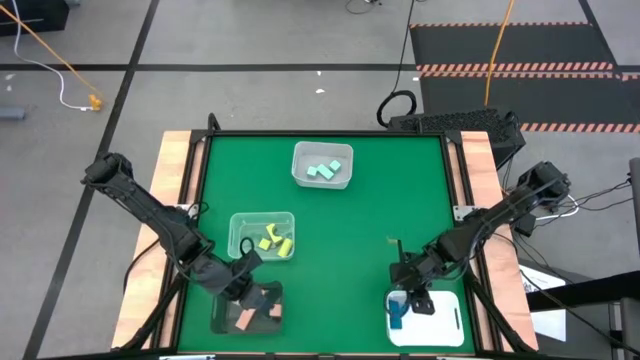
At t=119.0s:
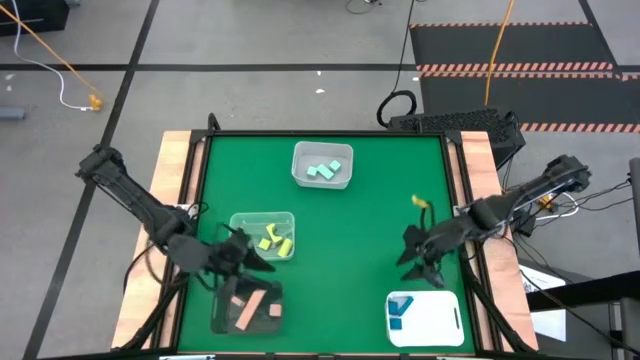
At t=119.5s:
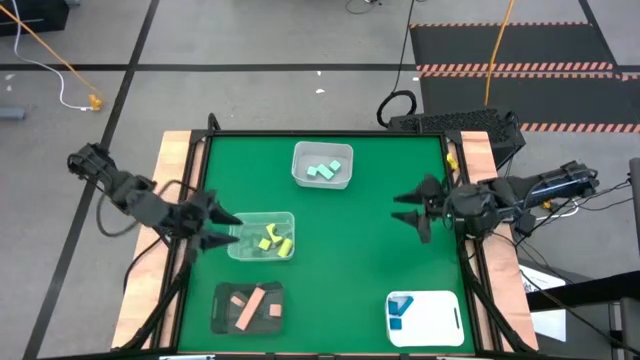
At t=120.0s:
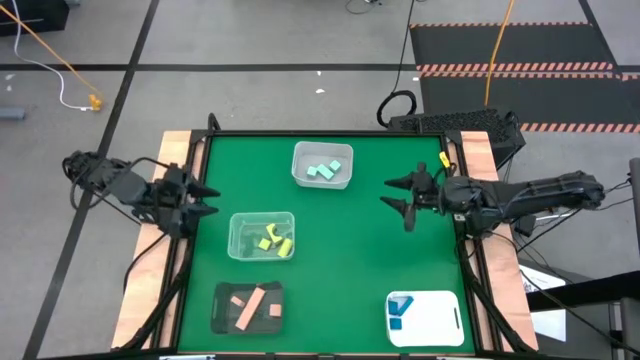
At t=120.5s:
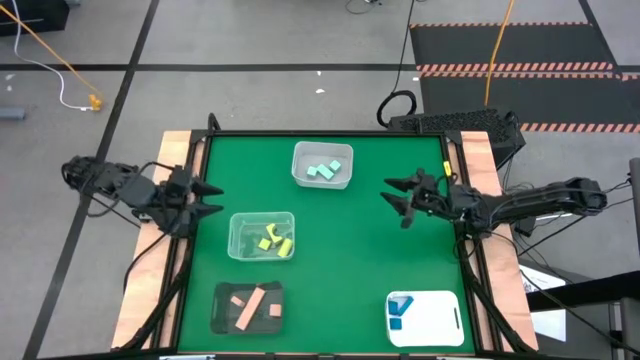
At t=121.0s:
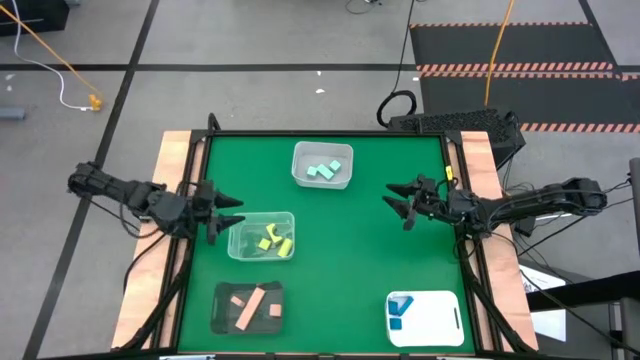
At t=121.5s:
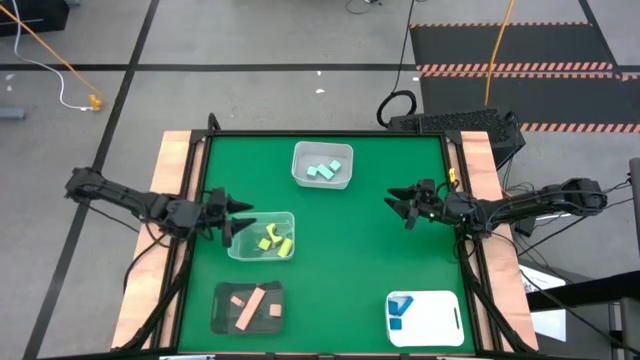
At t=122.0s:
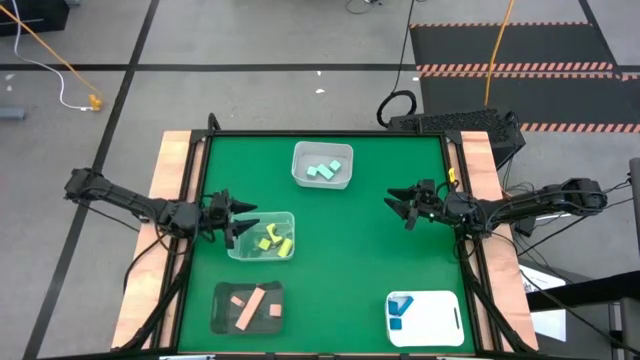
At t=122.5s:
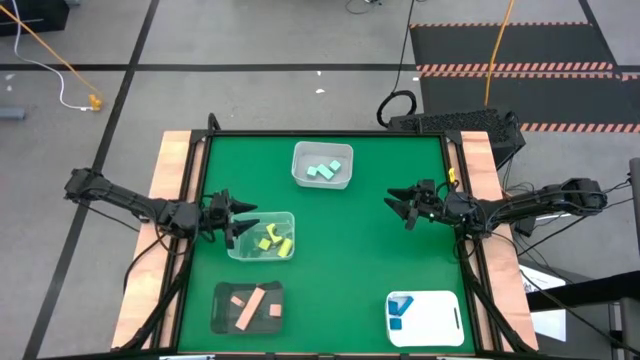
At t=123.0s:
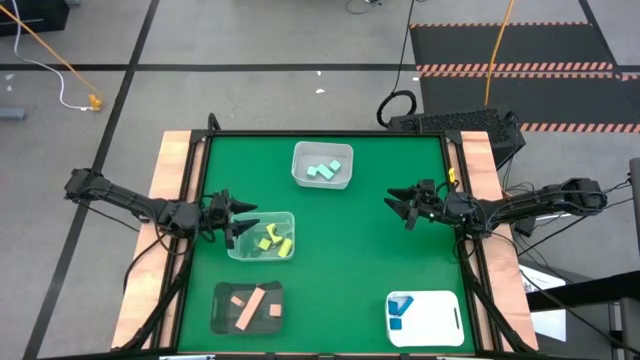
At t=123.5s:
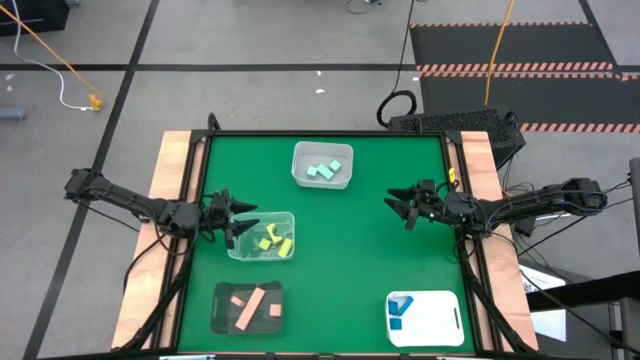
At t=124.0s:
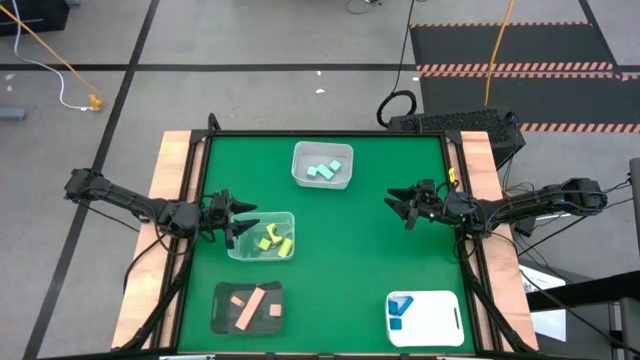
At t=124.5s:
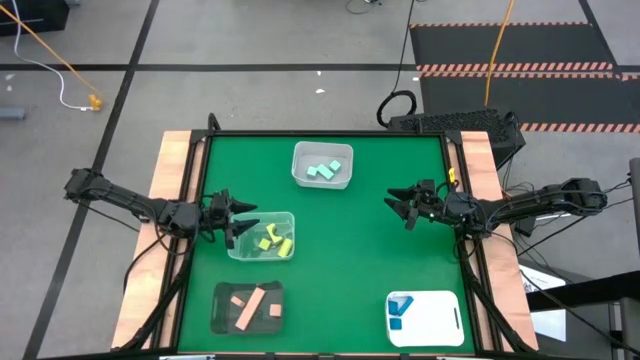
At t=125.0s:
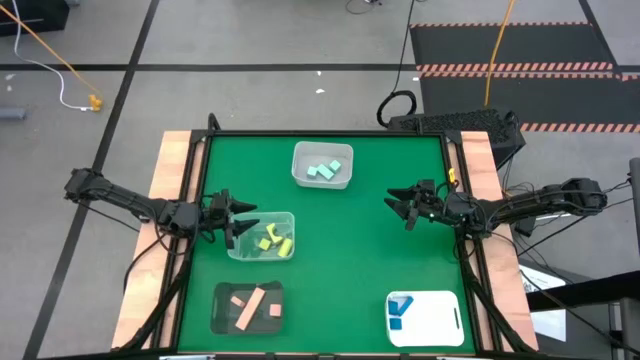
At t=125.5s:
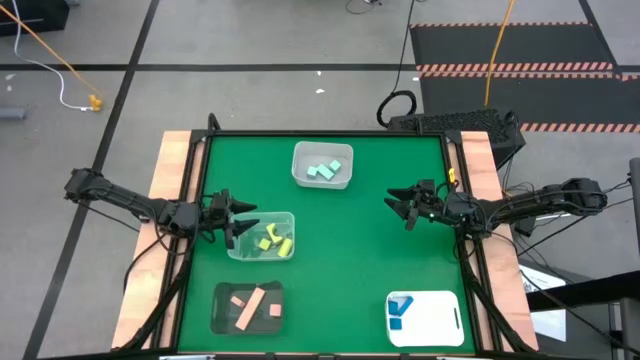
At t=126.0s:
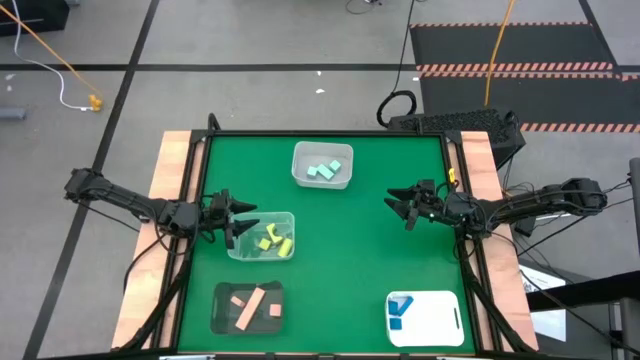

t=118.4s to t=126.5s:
Task: Sort & place blocks by color
Return to Home Position

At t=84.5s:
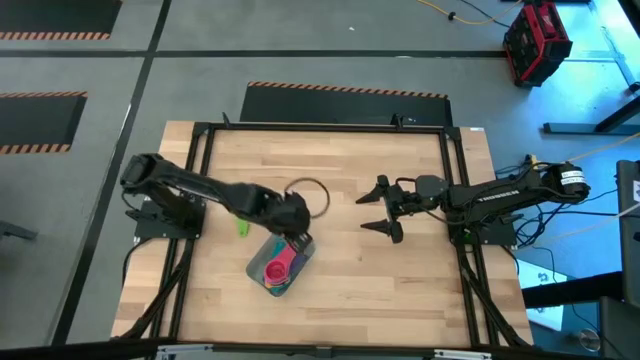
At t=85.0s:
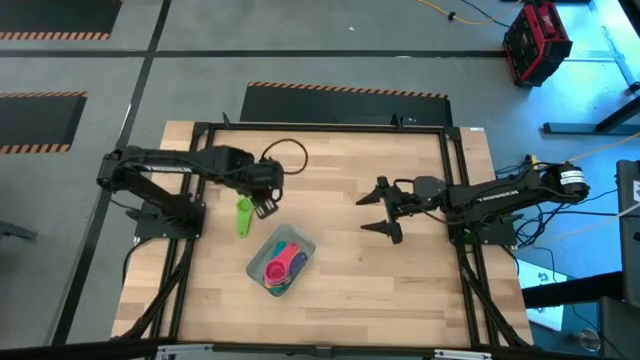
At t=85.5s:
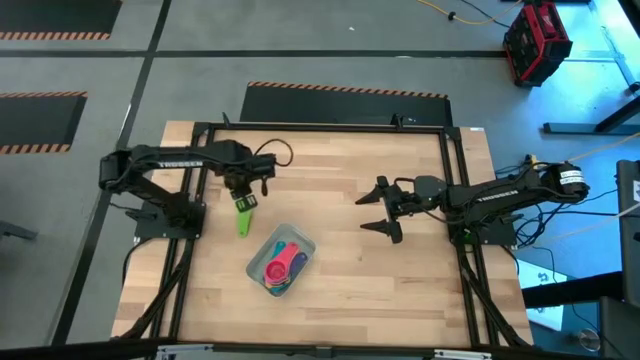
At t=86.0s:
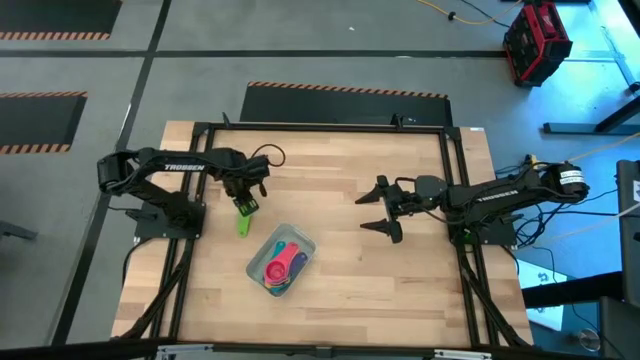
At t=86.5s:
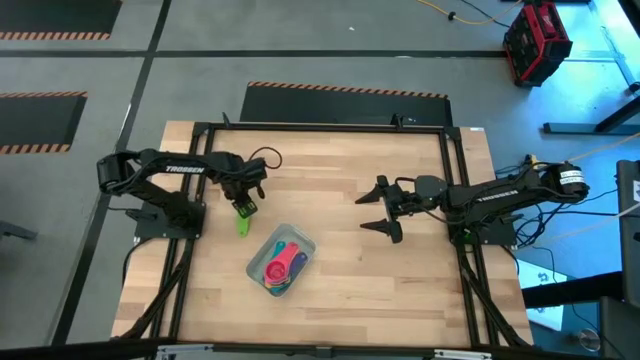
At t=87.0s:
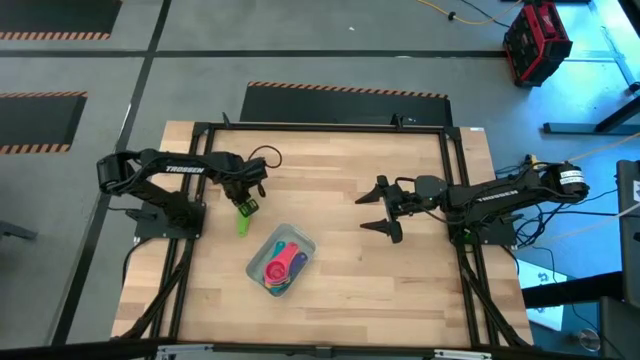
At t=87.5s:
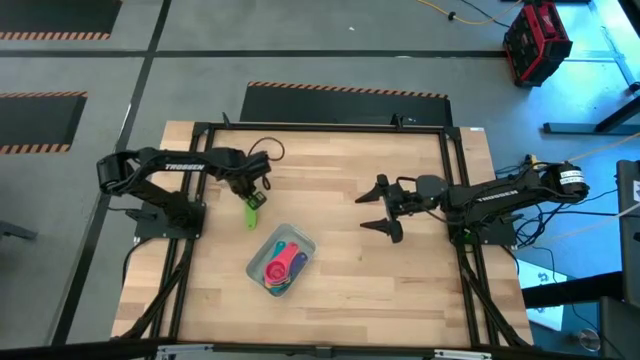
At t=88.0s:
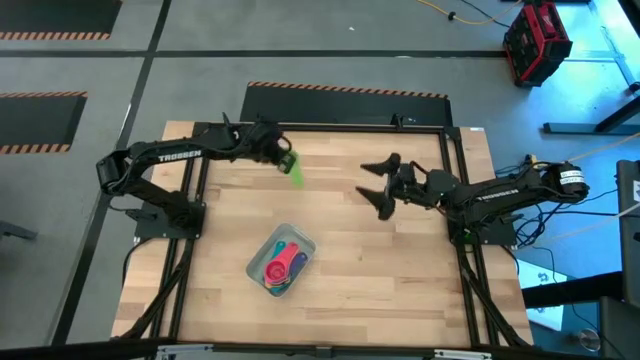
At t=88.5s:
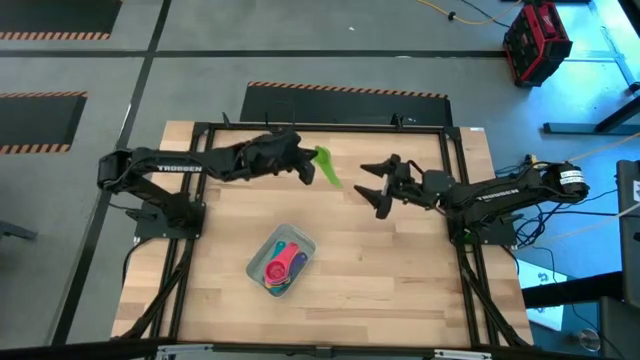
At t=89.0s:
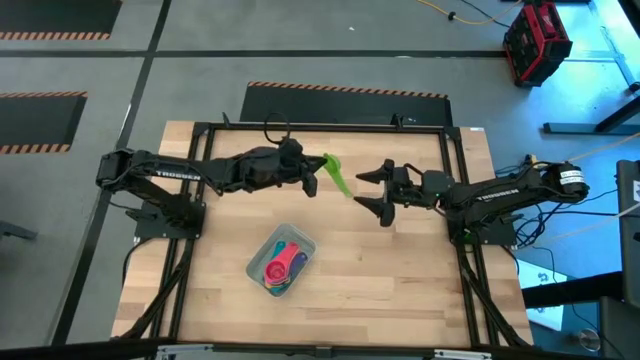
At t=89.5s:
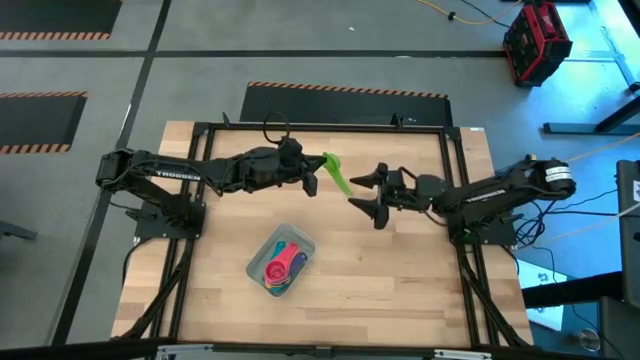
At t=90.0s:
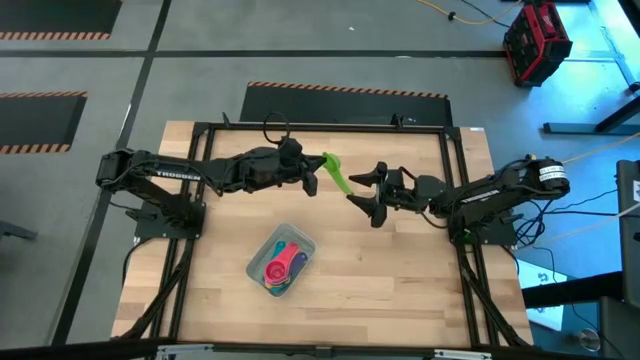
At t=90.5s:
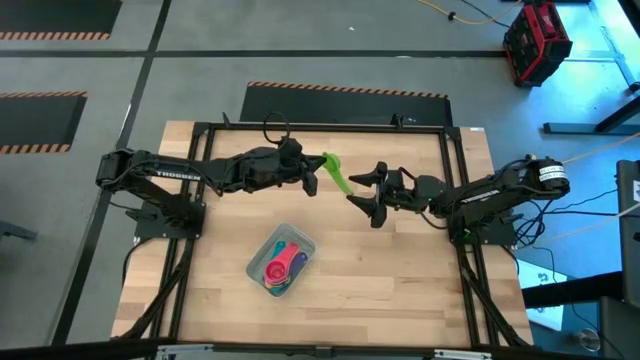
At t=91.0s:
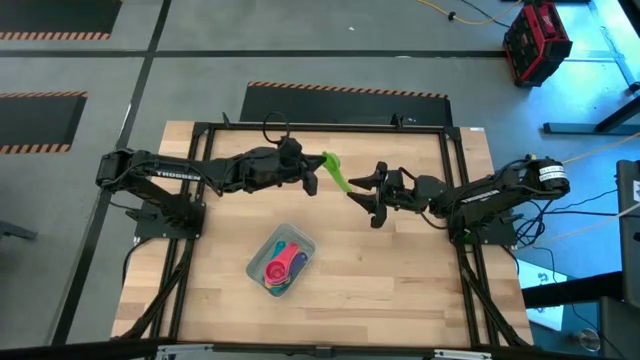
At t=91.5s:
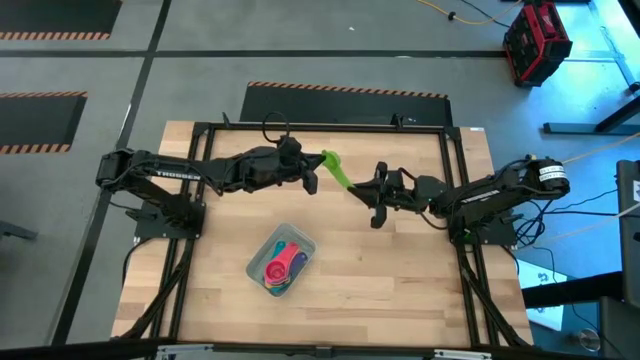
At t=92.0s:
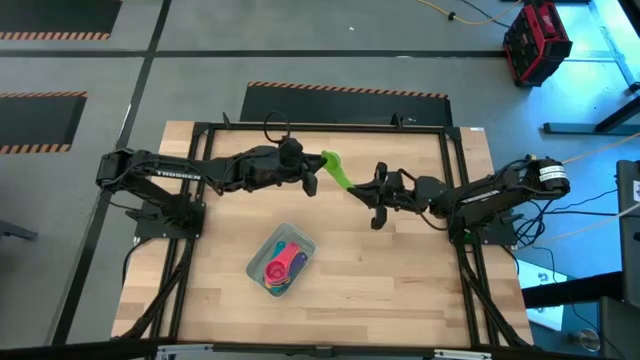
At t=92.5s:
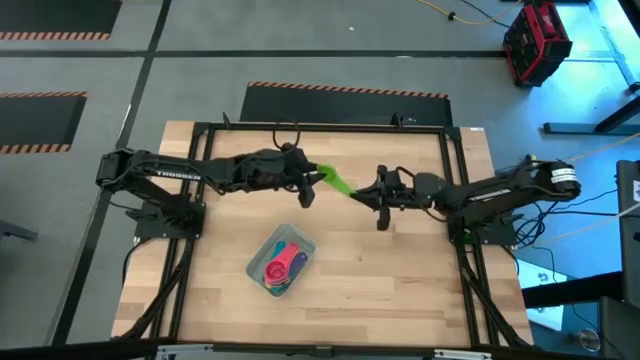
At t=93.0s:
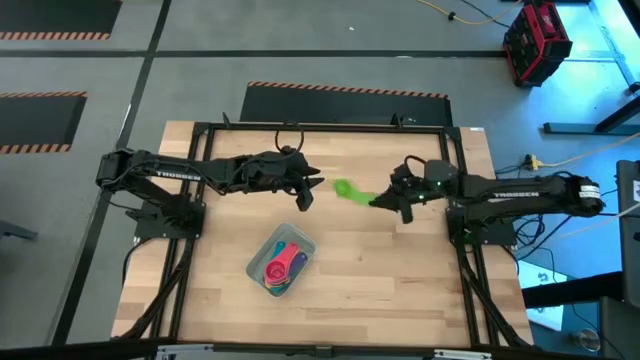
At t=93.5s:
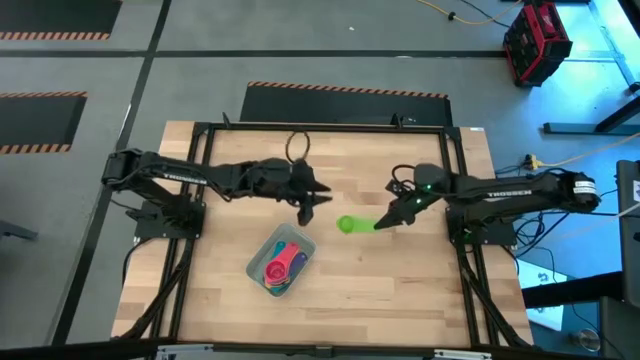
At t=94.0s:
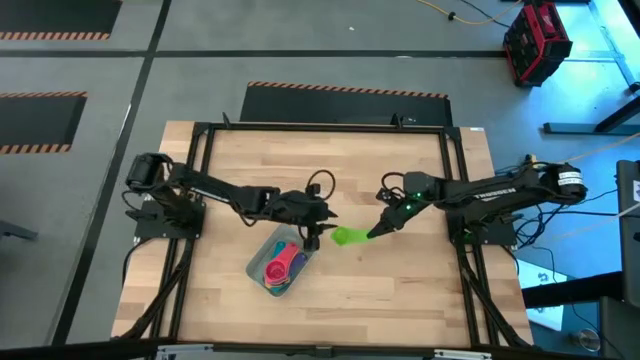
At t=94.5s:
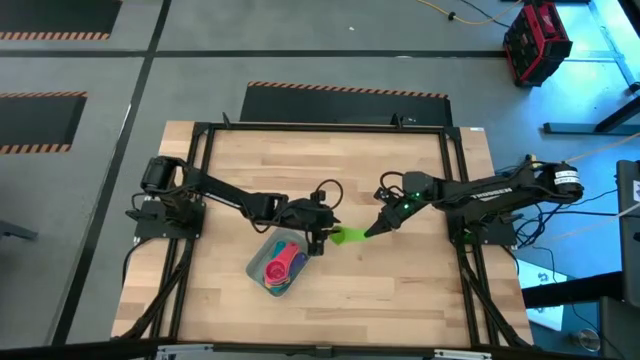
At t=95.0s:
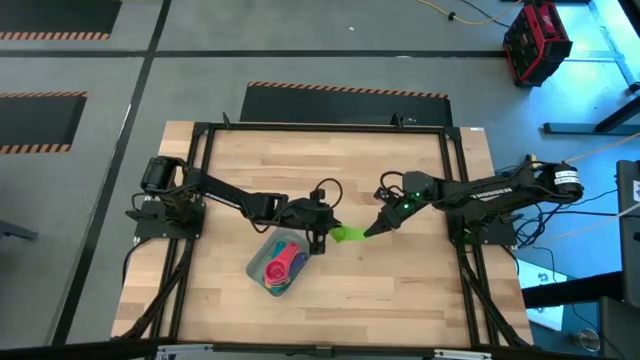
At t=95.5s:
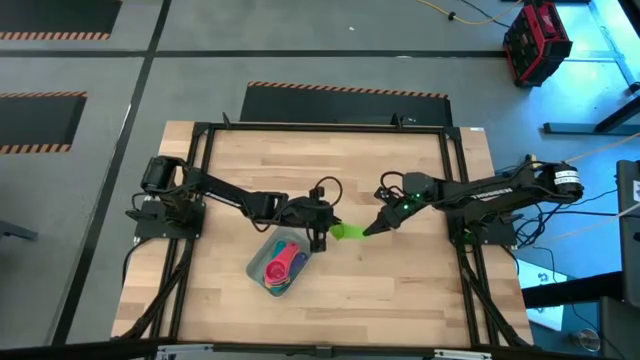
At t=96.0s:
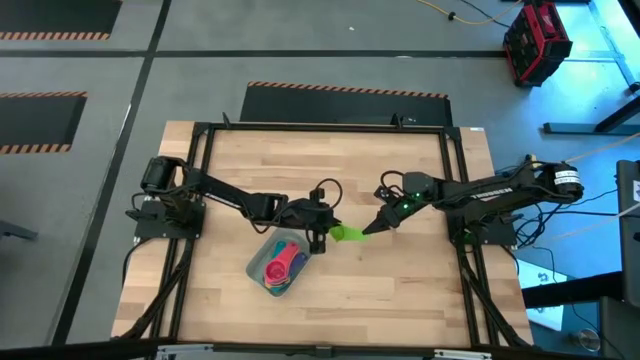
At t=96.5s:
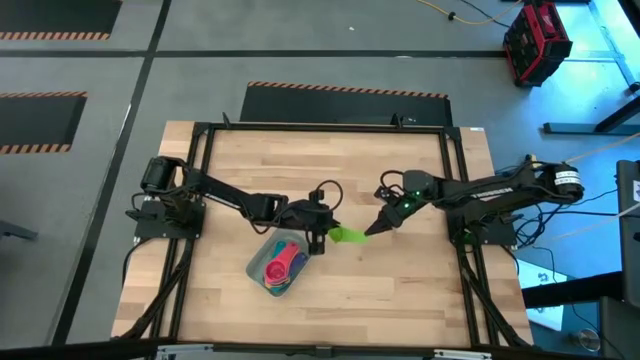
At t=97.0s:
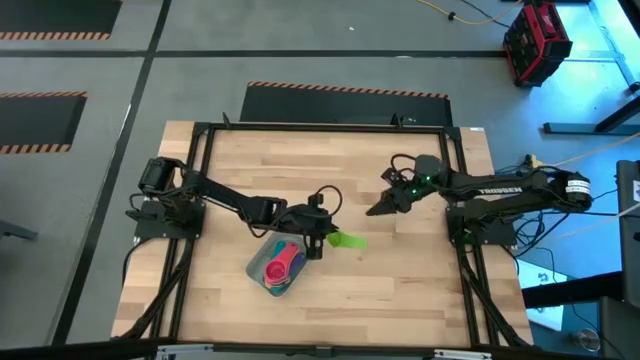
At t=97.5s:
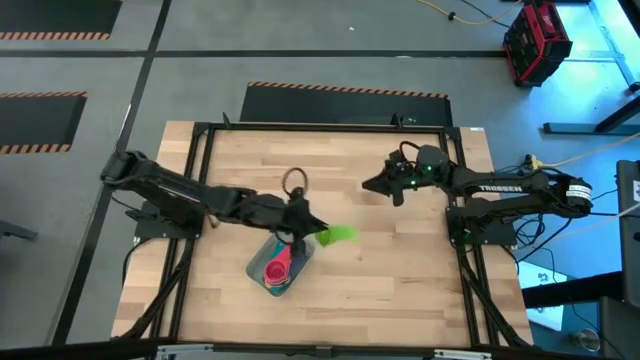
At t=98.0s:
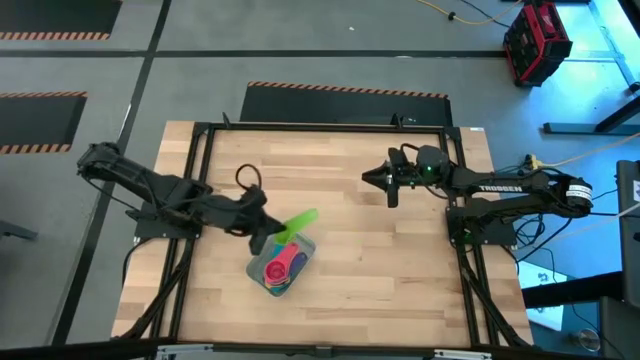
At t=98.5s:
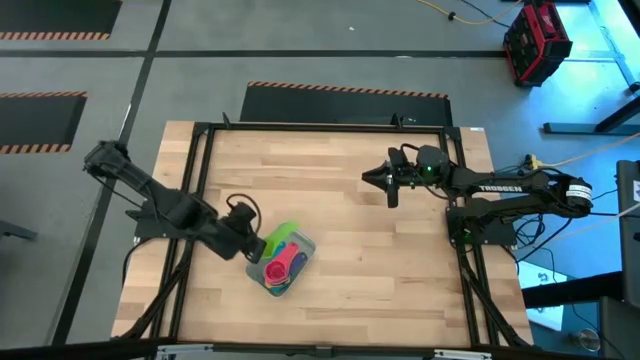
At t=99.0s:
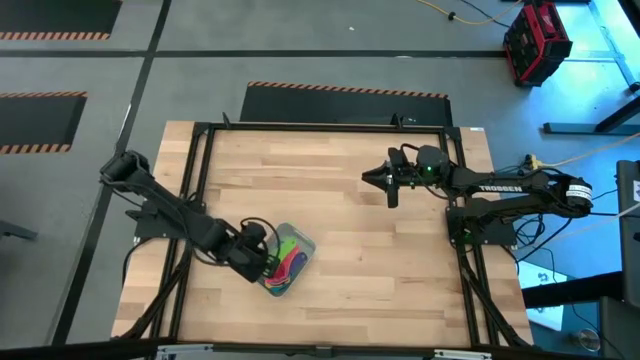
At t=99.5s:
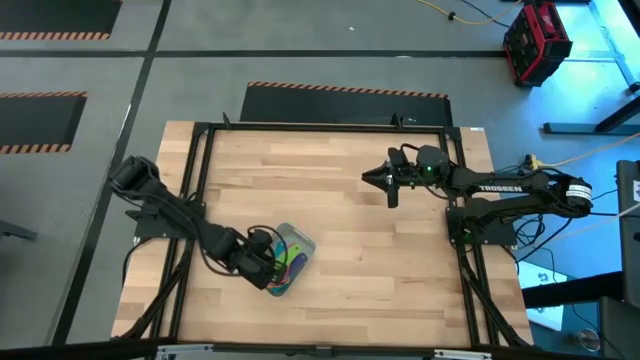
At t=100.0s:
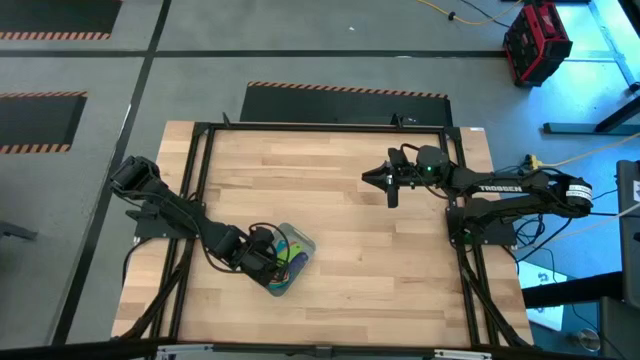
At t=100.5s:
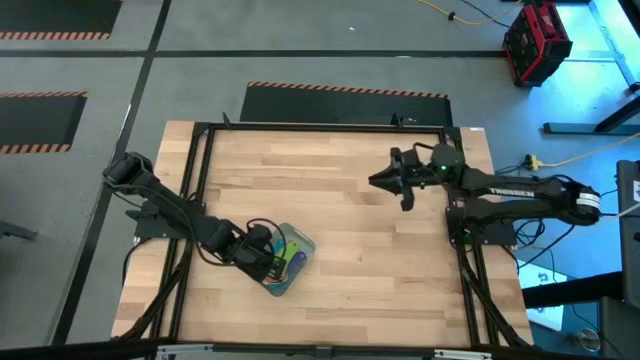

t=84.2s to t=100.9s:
Task: Nest measuring cups in basket
Stack the green measuring cup into the red measuring cup in the grey bin
